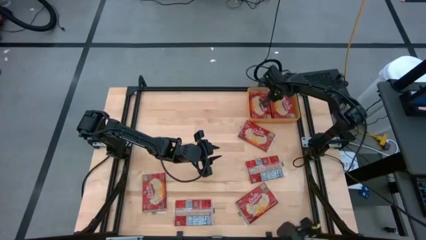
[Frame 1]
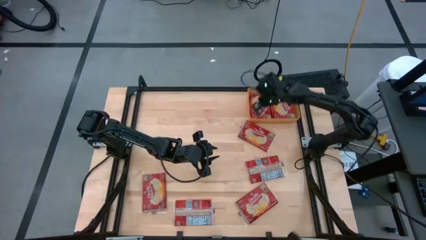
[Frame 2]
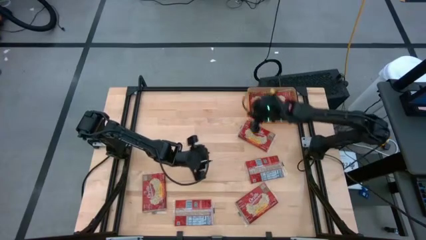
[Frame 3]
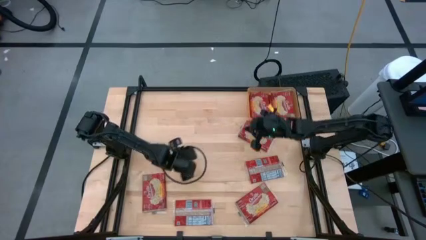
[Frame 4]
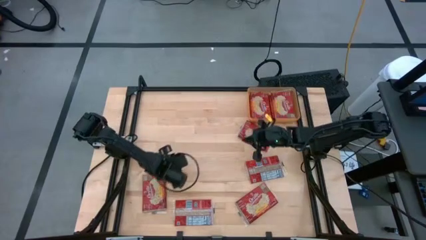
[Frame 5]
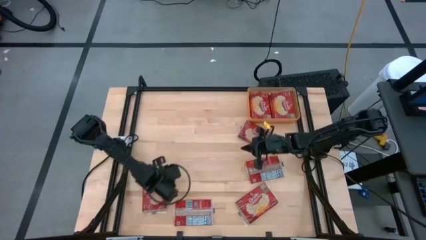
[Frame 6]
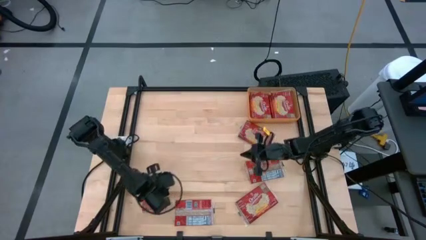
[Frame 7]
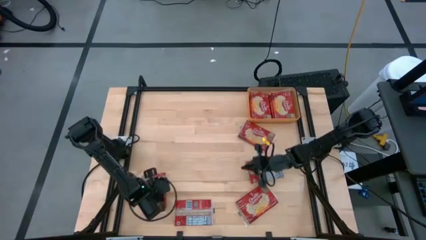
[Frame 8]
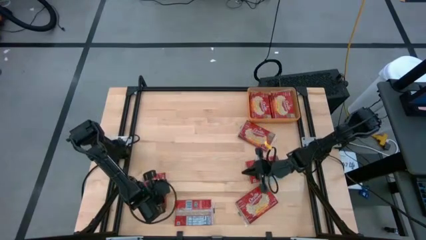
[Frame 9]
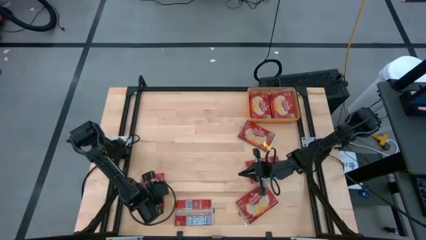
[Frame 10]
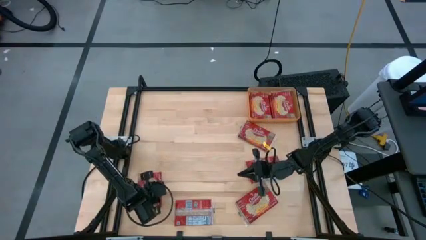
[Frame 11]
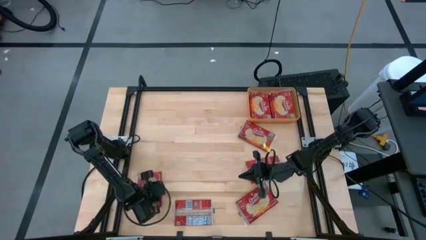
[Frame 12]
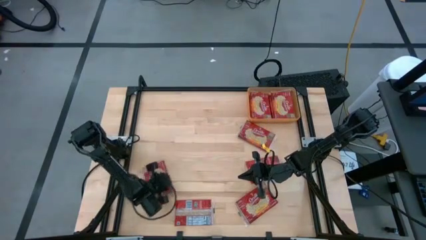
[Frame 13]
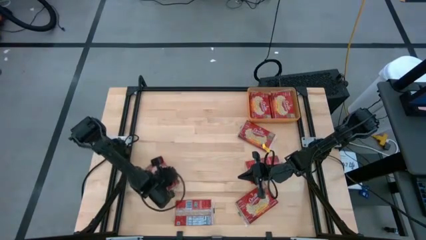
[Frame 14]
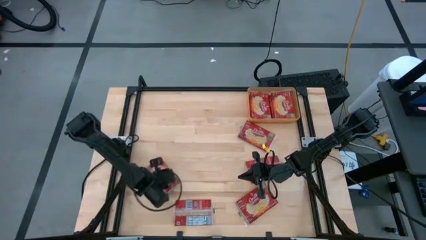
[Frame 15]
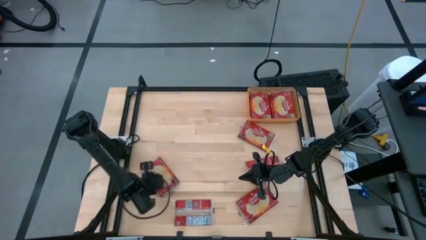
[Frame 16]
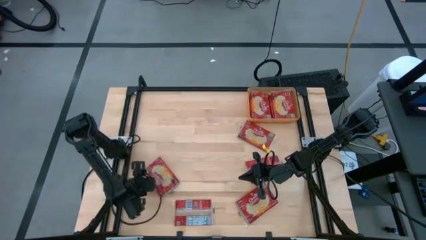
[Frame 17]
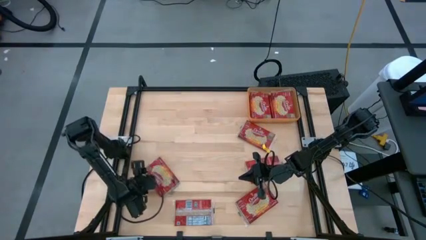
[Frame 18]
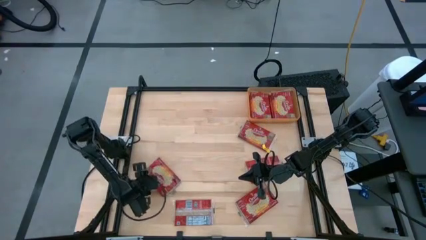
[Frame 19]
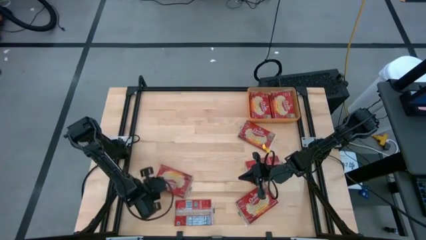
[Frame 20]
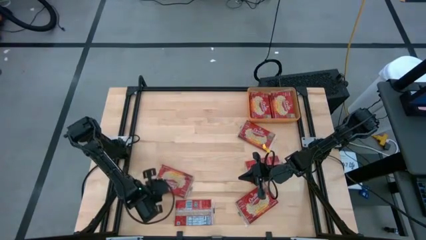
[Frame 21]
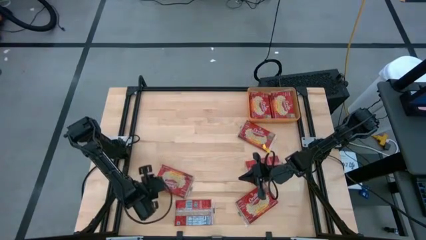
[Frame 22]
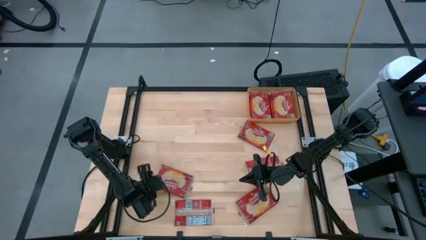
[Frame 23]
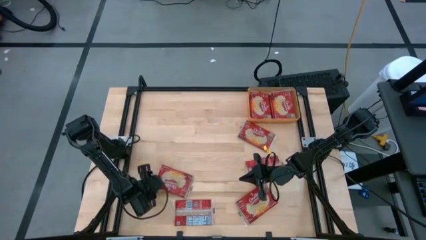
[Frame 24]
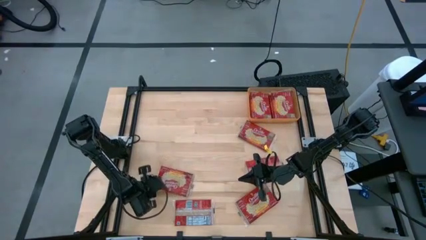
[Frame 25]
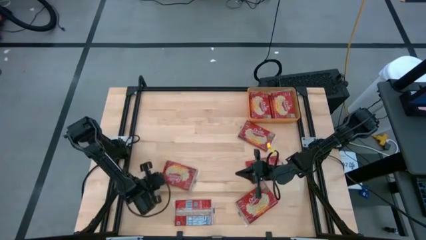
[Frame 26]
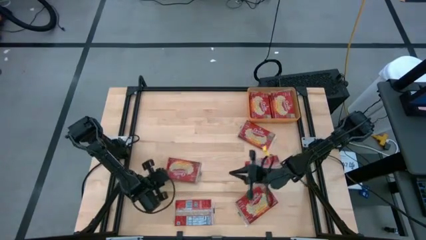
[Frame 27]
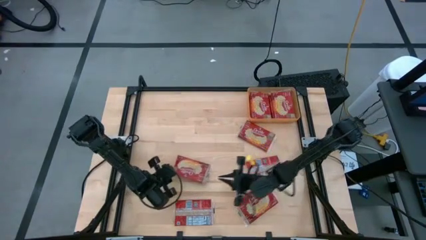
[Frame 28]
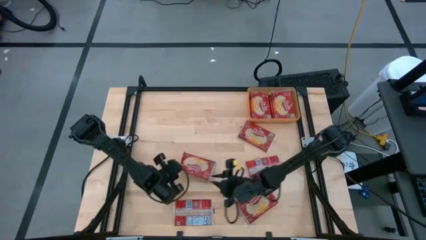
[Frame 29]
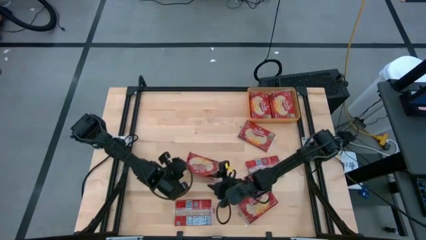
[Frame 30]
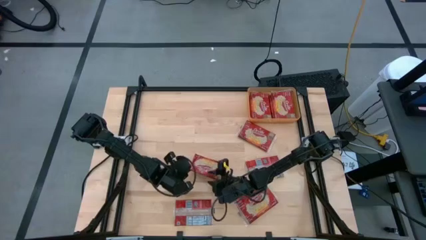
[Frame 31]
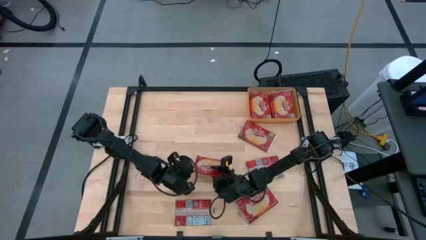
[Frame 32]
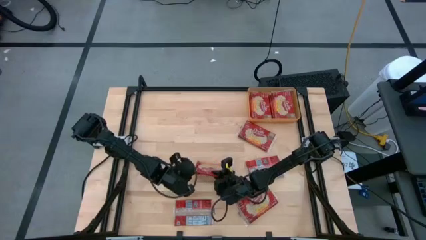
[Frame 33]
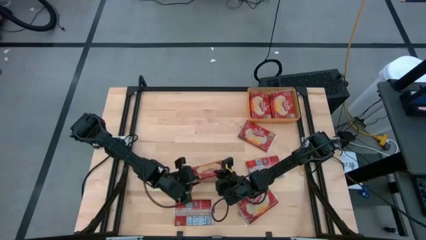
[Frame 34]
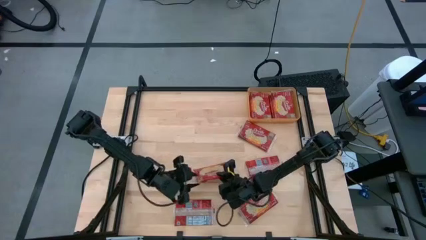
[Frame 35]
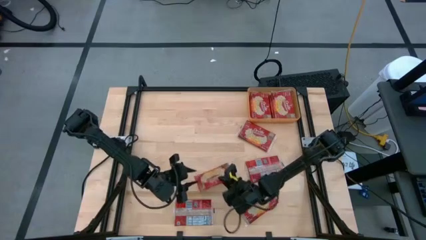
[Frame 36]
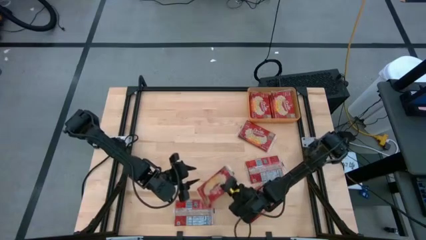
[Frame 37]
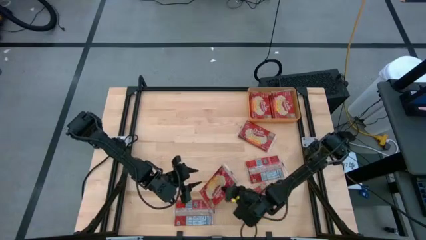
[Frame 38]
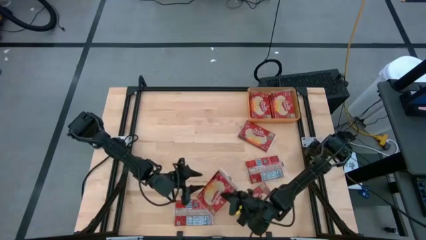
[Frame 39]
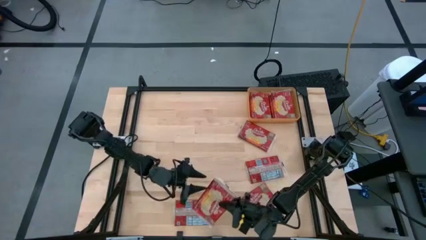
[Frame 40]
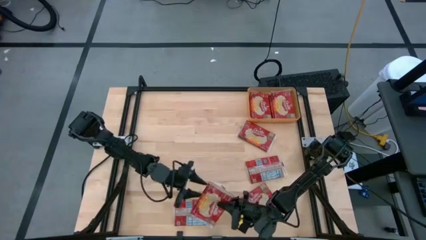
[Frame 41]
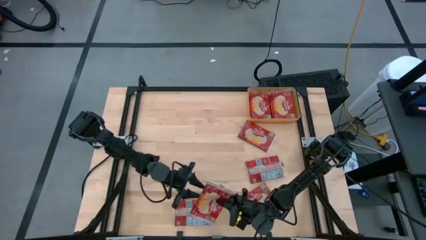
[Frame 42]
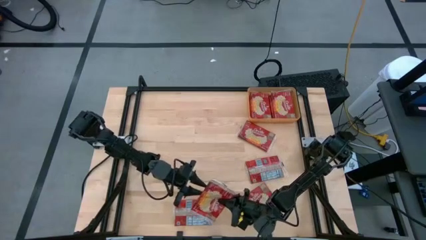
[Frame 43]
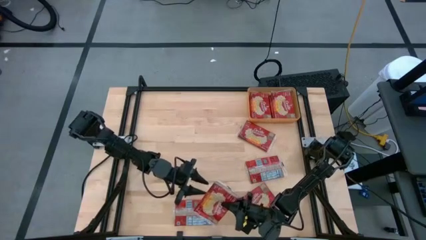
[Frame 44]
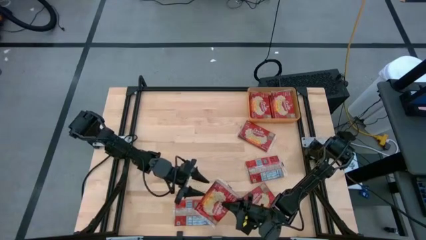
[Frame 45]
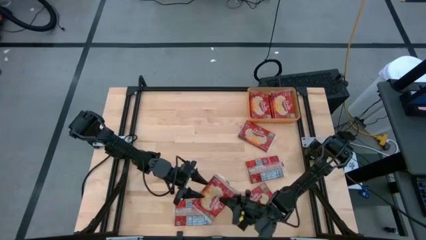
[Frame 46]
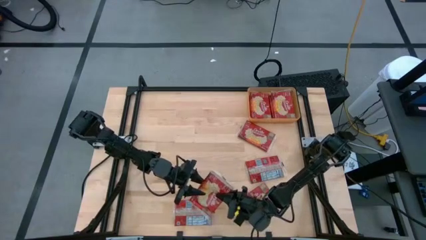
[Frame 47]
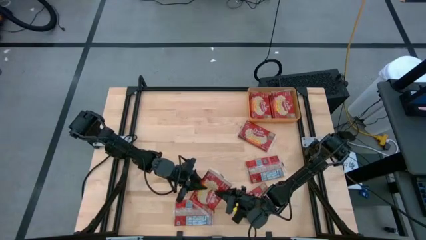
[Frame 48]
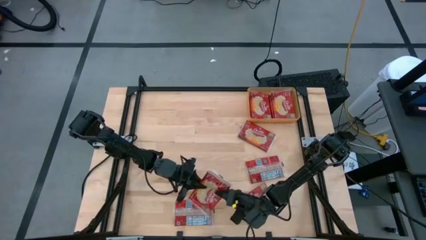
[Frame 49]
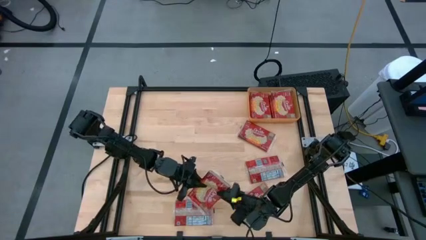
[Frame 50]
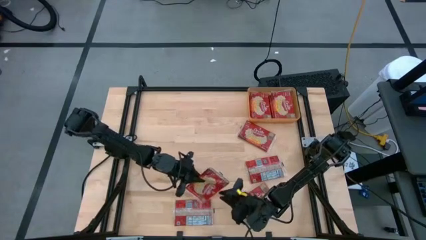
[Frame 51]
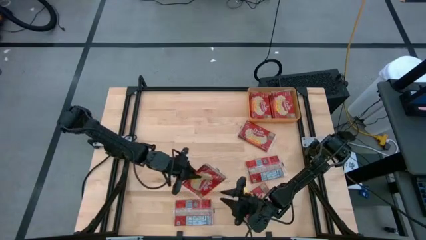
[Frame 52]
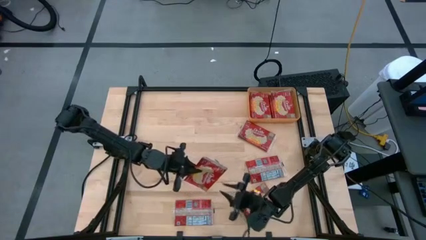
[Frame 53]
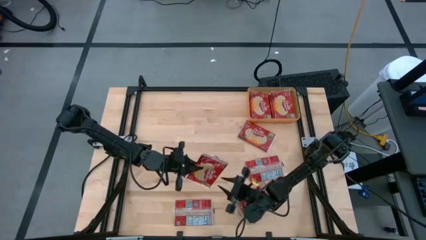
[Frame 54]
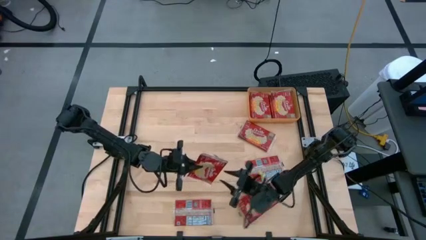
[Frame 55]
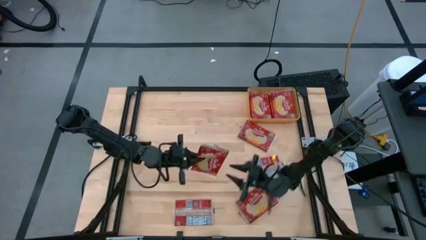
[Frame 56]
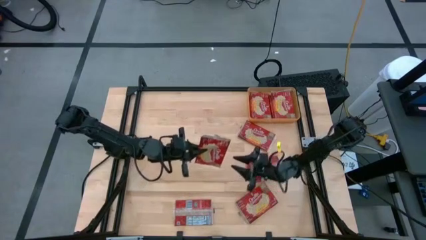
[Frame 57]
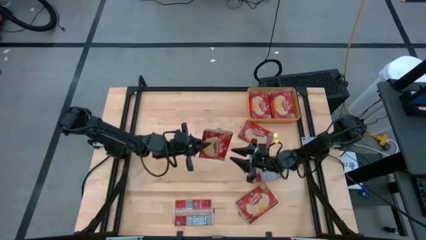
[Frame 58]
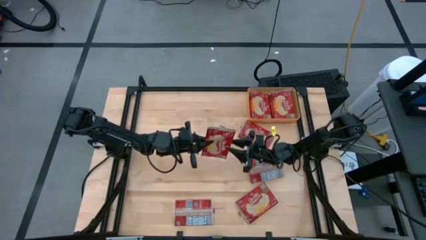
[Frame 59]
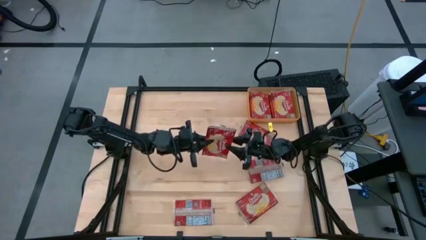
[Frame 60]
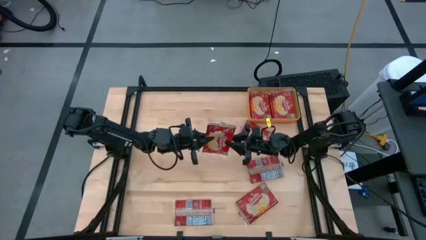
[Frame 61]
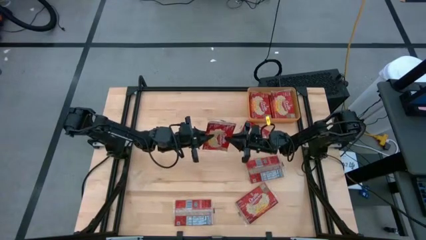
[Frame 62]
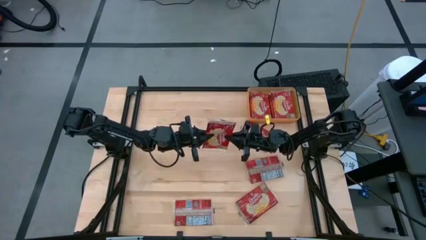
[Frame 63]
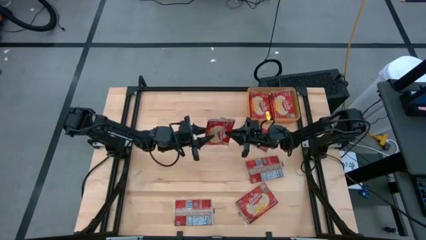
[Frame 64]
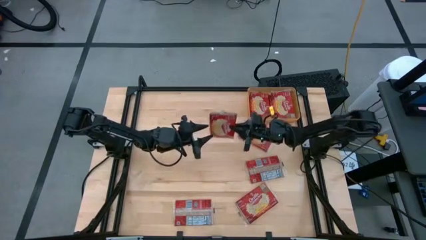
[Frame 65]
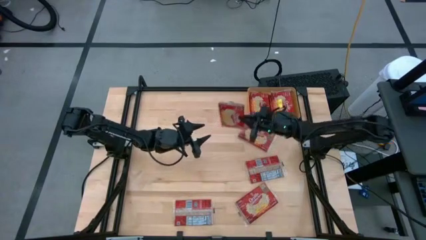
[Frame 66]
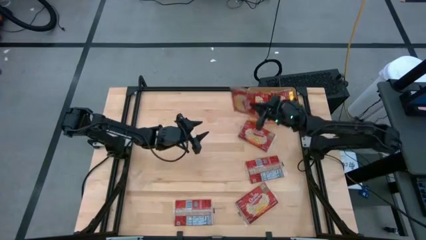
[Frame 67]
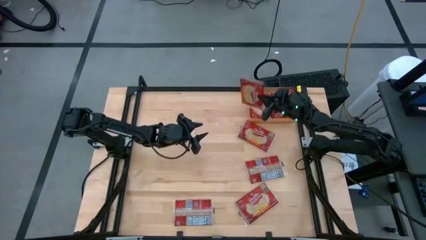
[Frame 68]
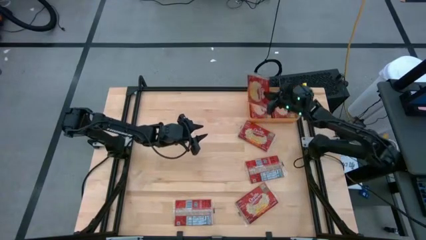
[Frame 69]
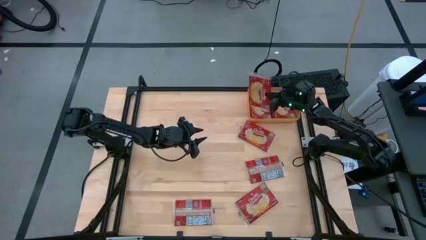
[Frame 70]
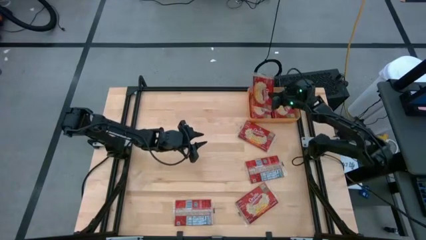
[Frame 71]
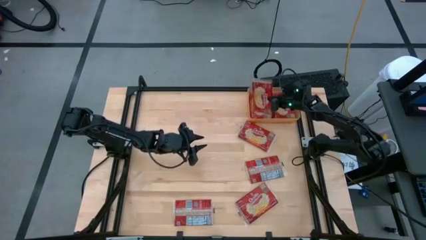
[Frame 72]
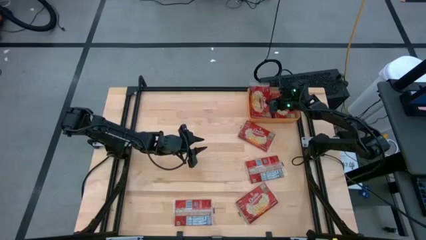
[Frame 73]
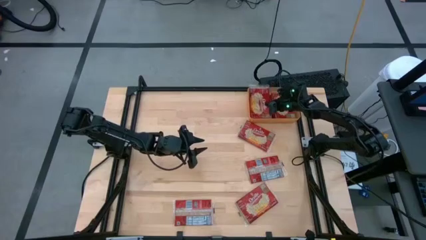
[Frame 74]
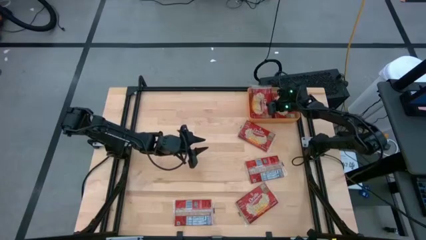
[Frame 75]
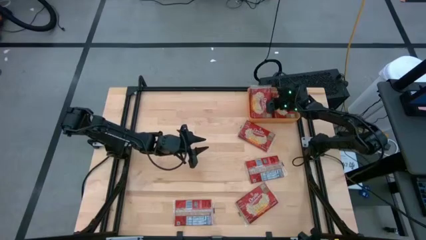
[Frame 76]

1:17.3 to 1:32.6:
Task: Sort popcorn bags into baskets
Put the red popcorn bag into the orange bin

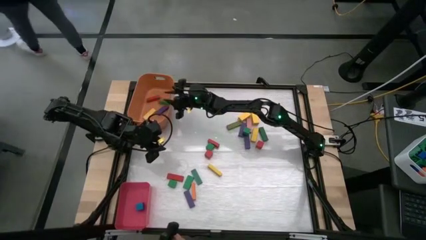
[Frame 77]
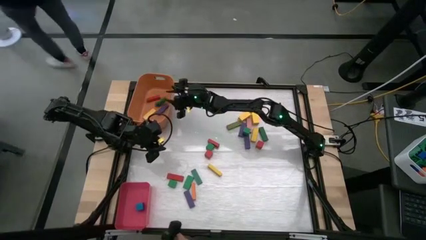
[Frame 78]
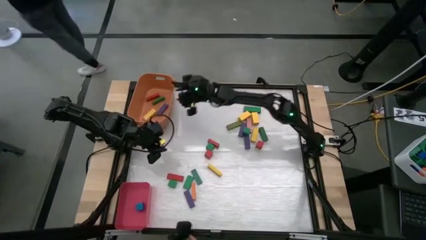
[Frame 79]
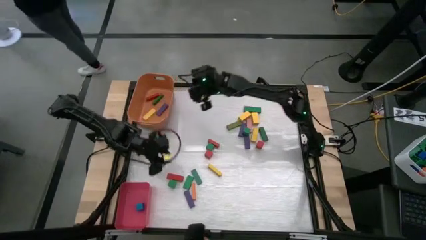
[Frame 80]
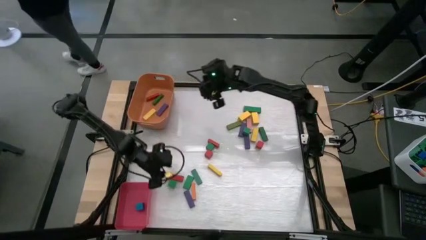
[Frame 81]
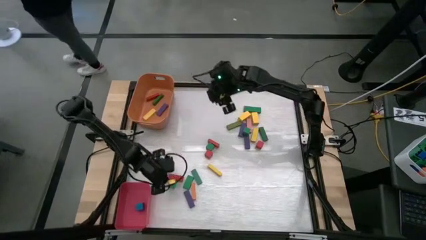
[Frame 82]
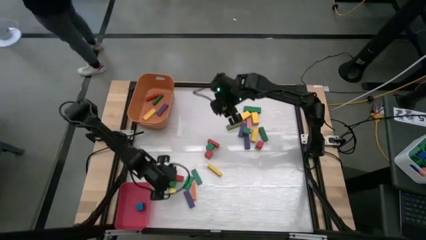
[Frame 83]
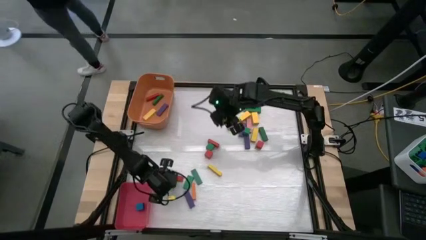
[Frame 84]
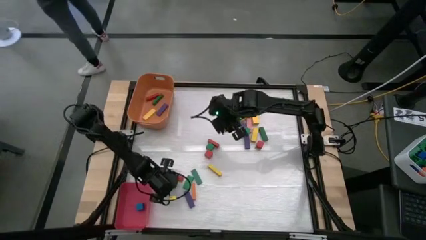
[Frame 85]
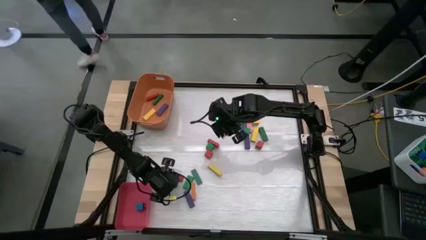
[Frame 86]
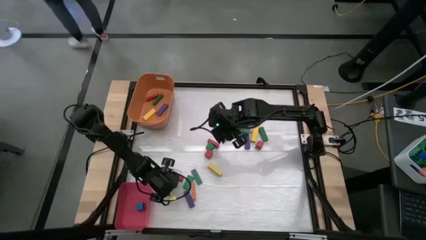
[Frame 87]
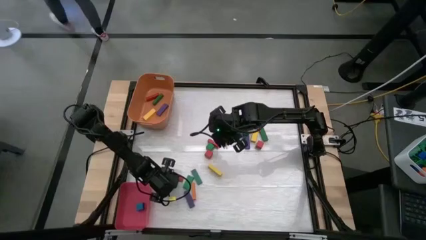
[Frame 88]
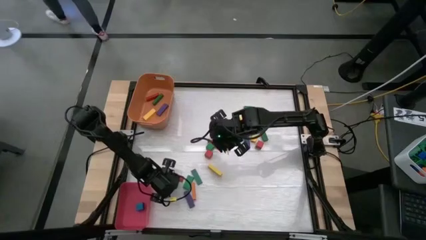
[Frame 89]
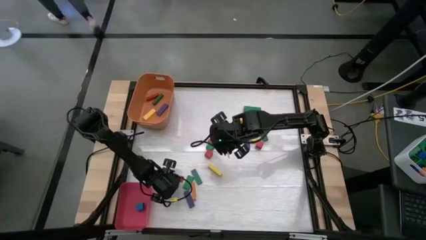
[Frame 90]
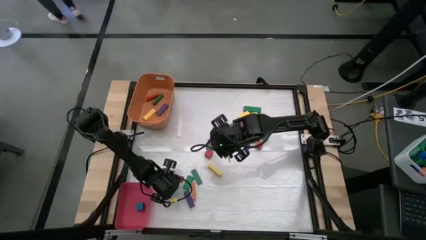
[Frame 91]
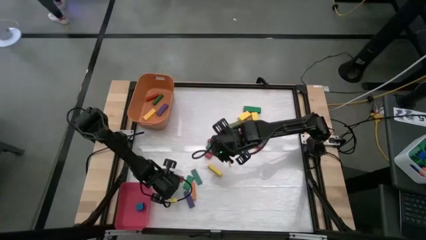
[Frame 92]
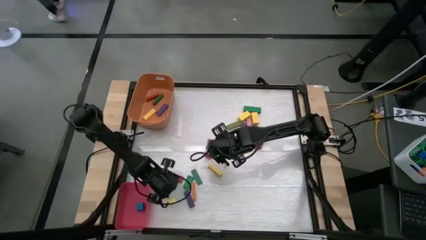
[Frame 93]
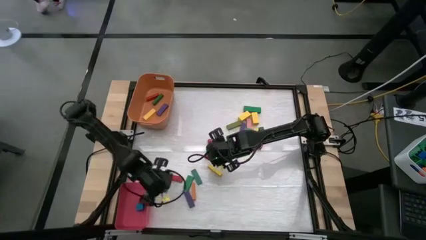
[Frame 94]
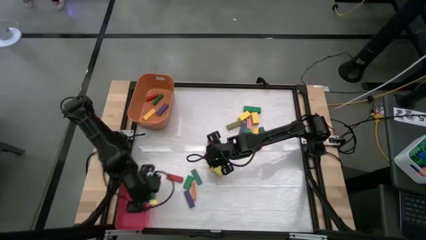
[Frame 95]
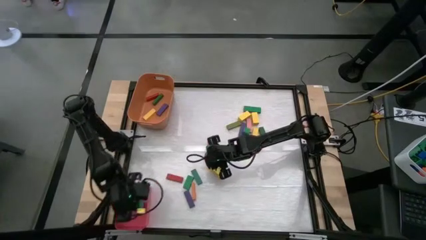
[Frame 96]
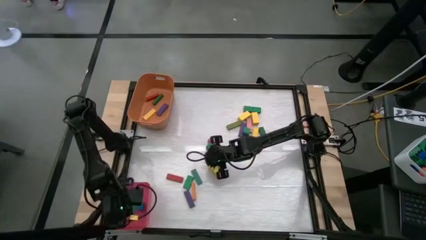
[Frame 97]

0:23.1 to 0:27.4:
Task: Sort blocks by size
Put the small green block into the red bin
